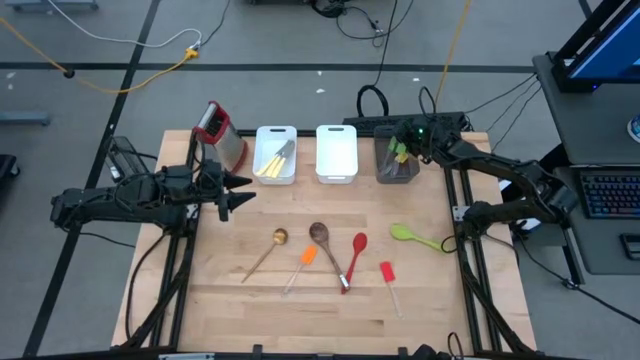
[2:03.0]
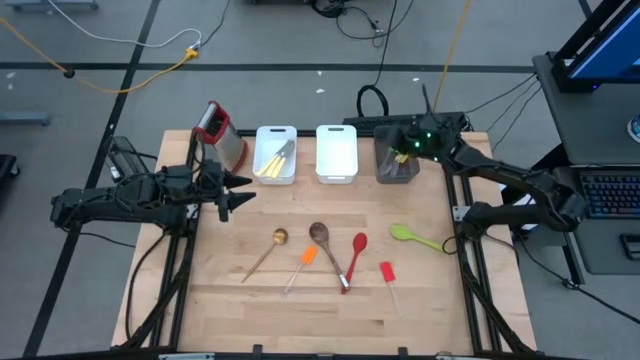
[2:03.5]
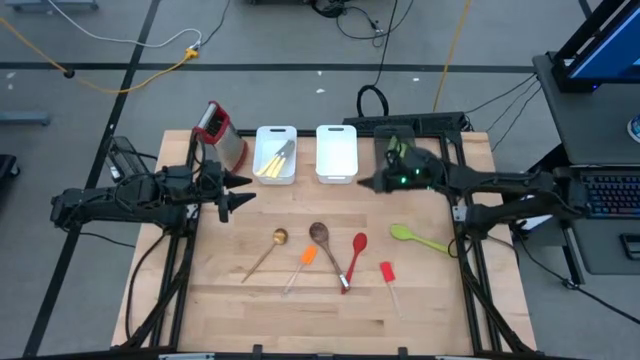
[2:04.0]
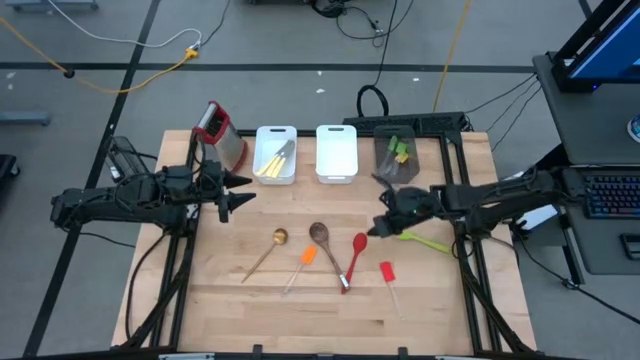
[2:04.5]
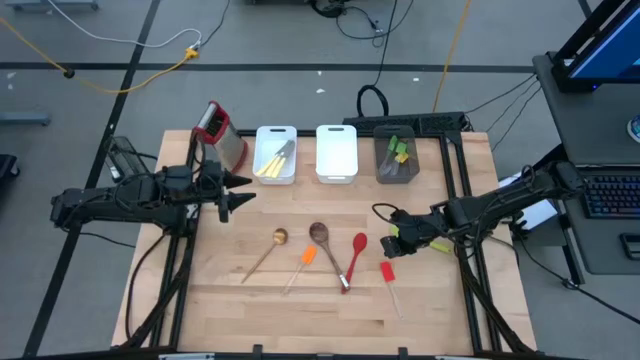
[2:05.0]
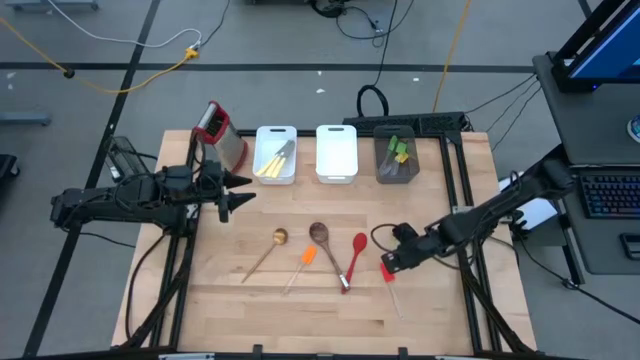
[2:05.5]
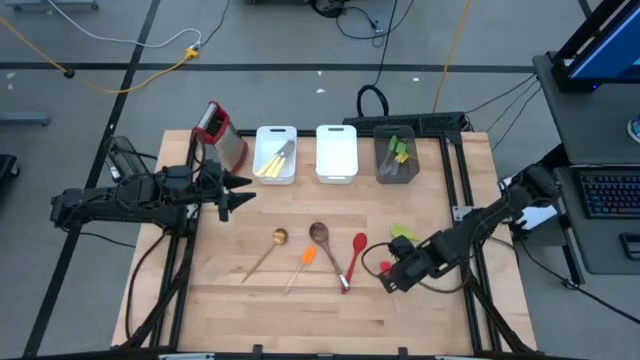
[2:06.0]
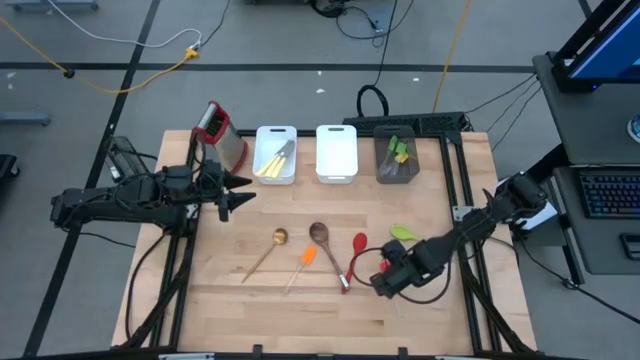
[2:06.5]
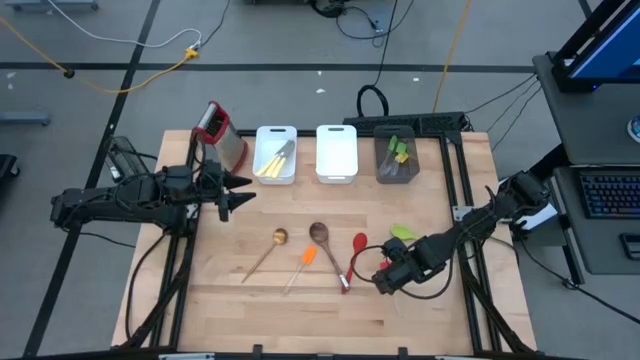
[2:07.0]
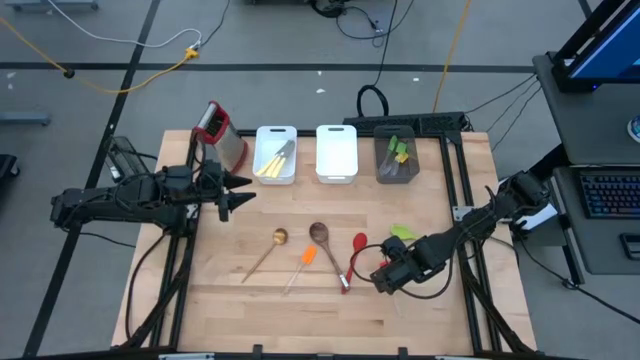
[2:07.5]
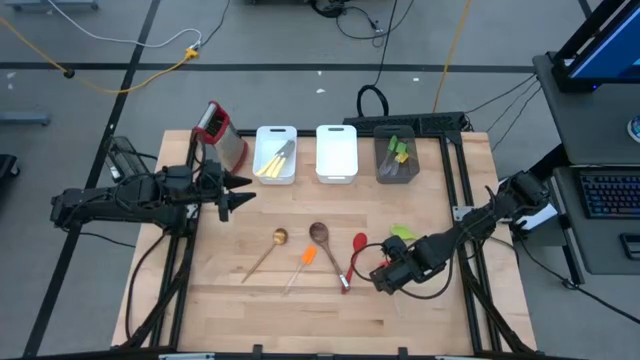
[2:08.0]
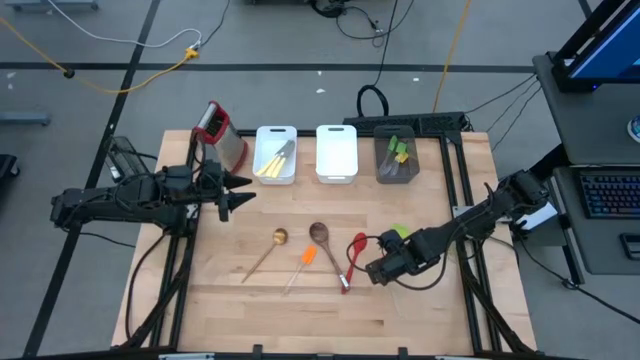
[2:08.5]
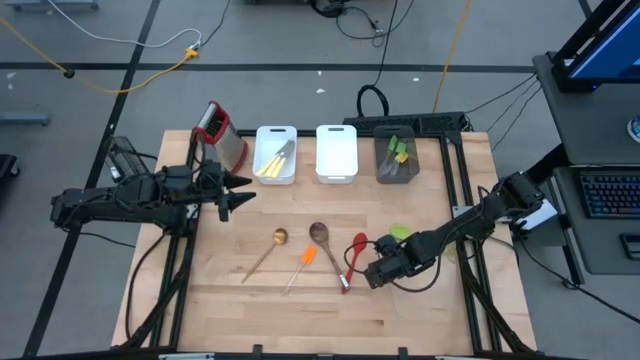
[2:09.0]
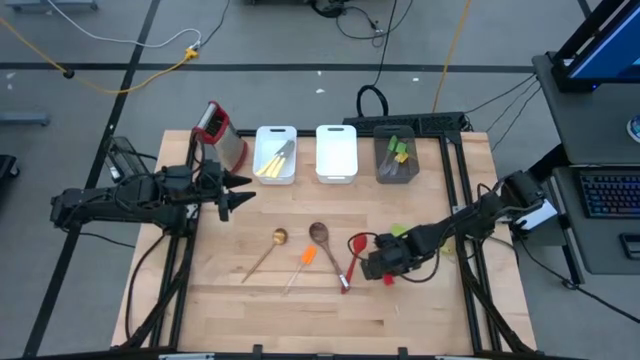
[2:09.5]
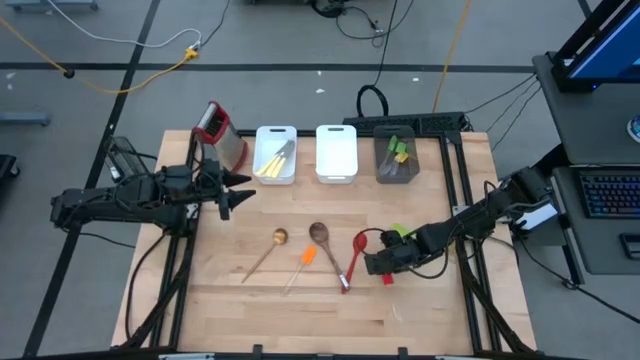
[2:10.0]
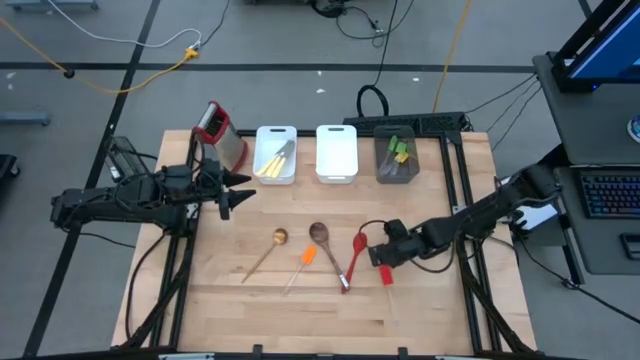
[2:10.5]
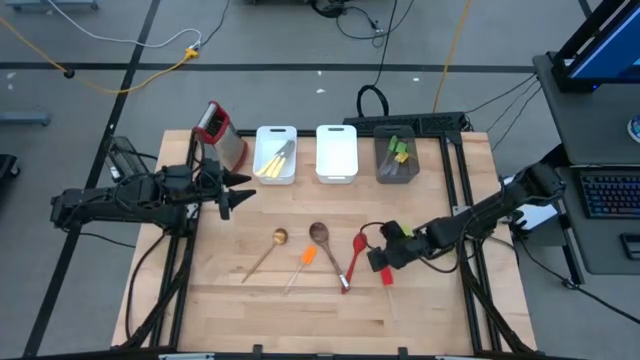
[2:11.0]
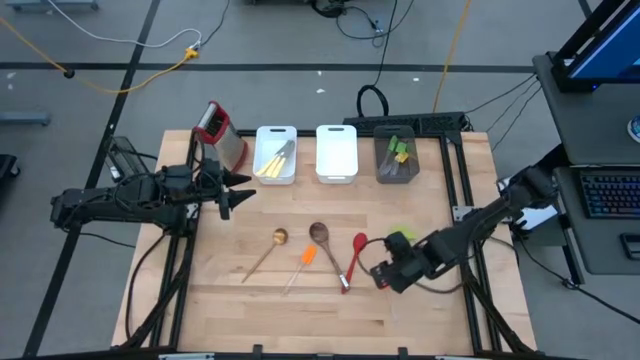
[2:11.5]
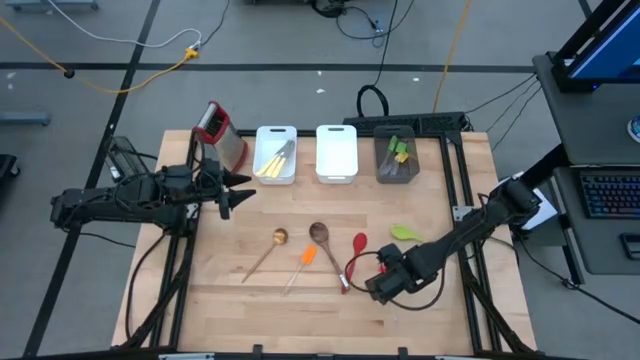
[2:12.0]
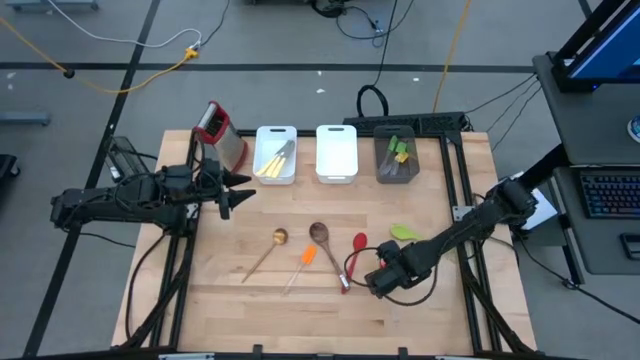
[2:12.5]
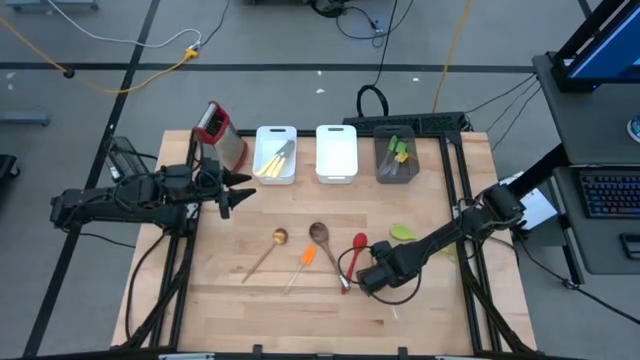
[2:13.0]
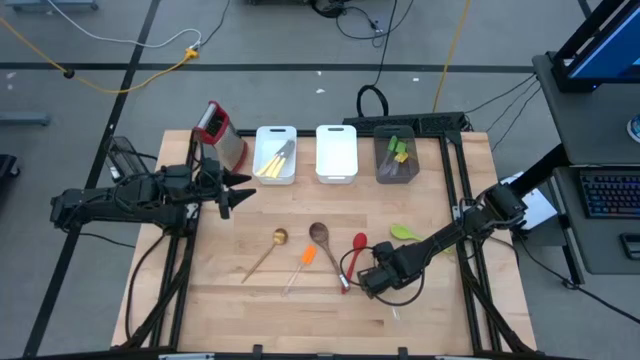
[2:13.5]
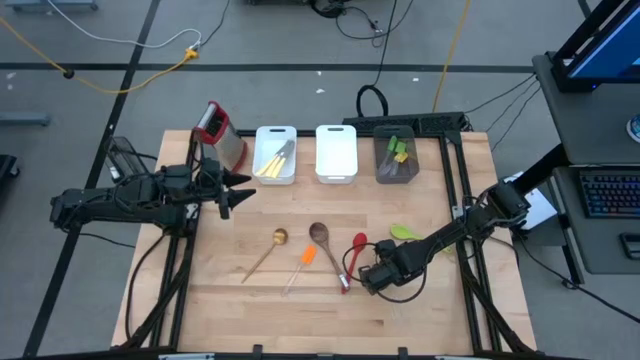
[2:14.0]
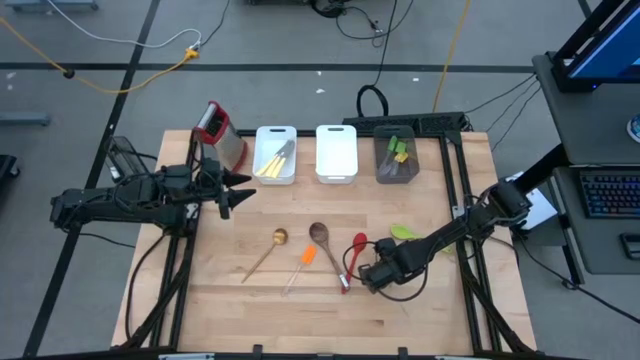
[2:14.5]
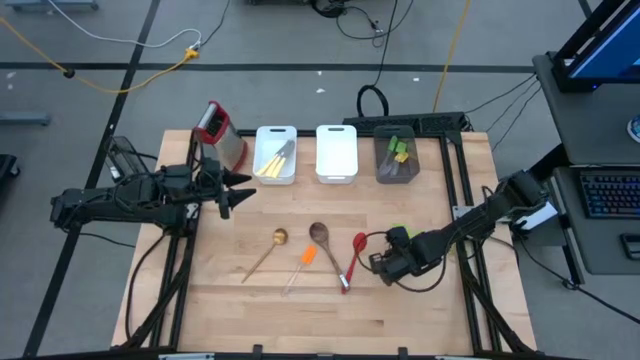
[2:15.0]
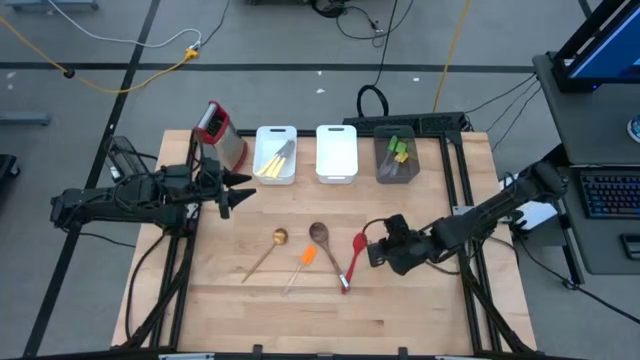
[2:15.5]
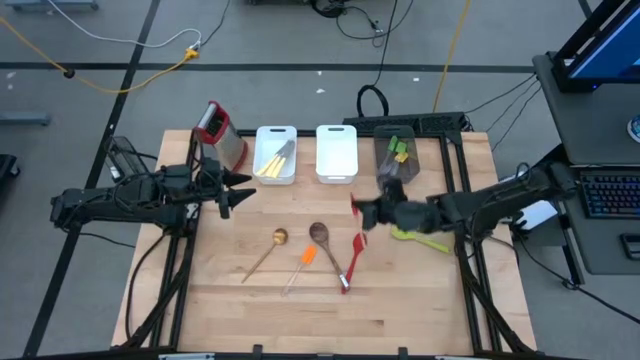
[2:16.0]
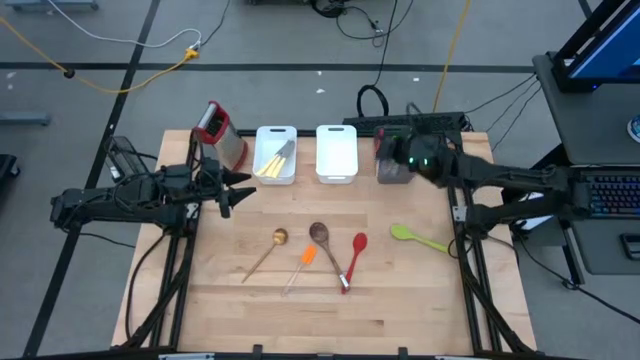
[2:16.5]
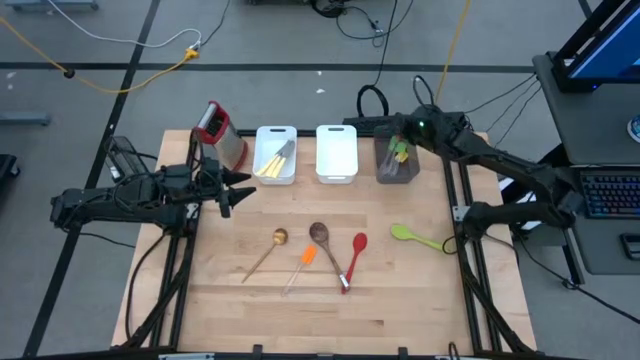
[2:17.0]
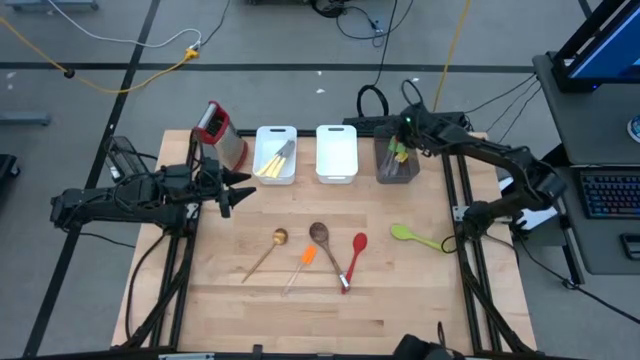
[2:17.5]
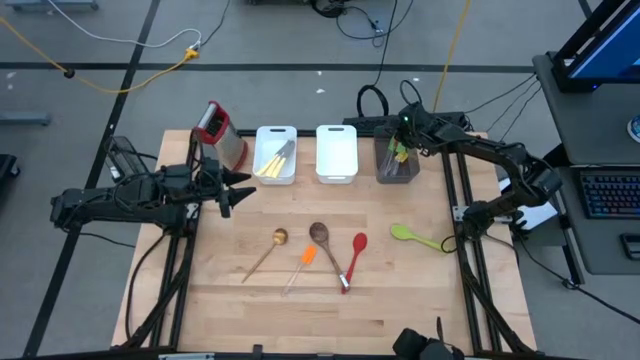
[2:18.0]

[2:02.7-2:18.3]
Task: Pick & Place Kitchen Items
Put the red spatula into the black bin

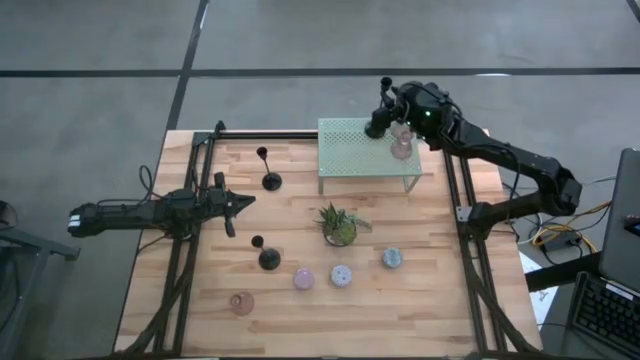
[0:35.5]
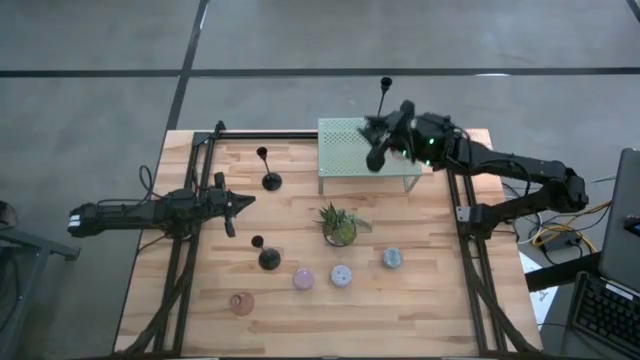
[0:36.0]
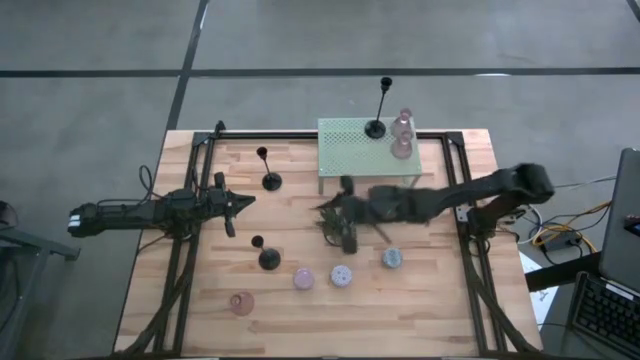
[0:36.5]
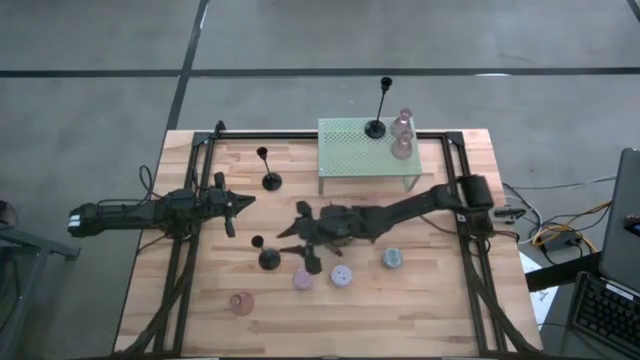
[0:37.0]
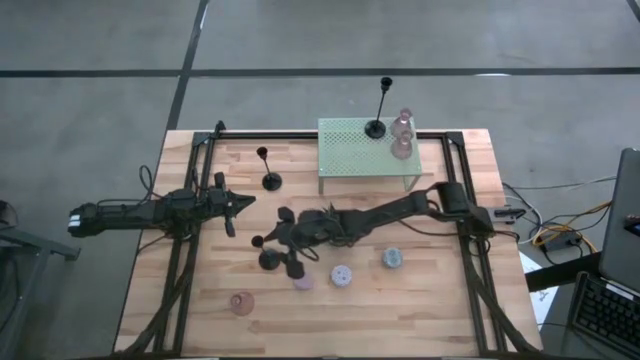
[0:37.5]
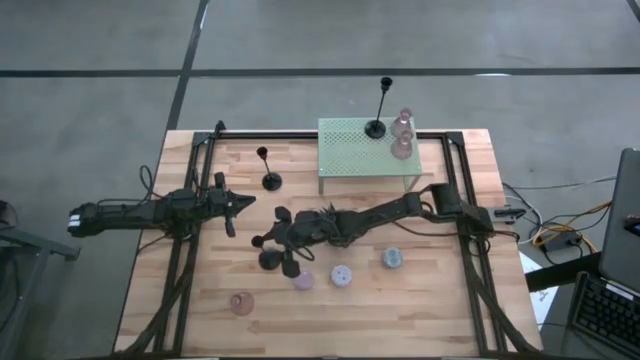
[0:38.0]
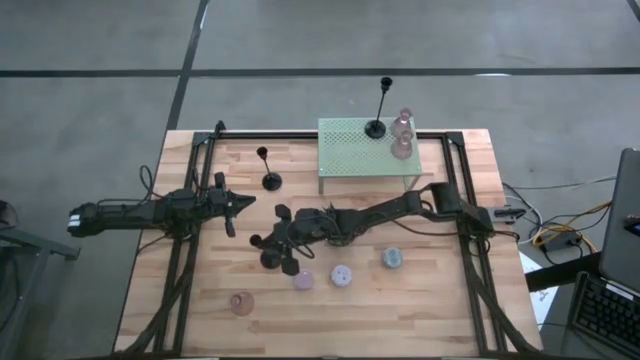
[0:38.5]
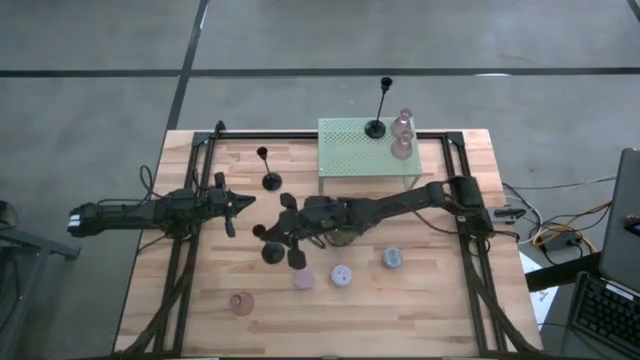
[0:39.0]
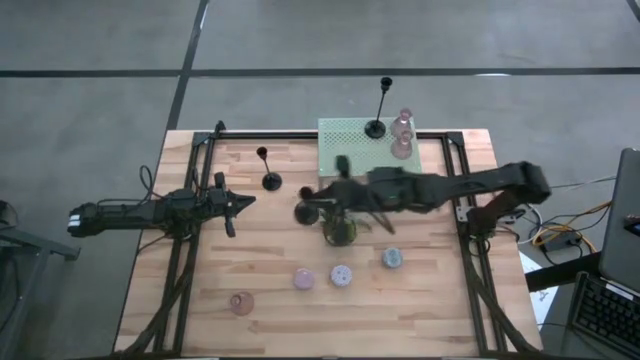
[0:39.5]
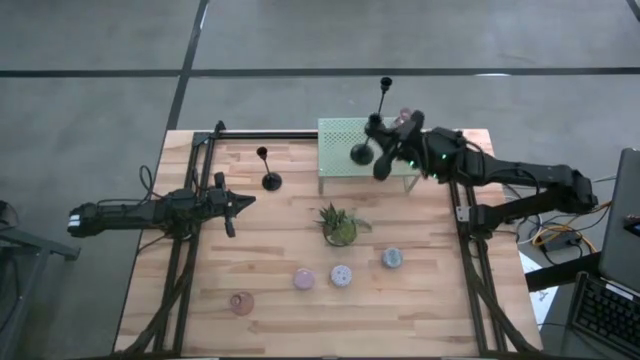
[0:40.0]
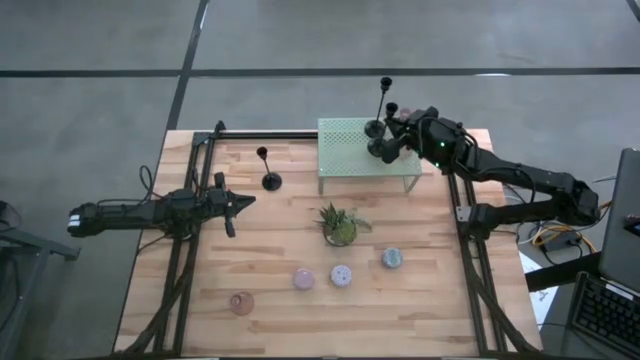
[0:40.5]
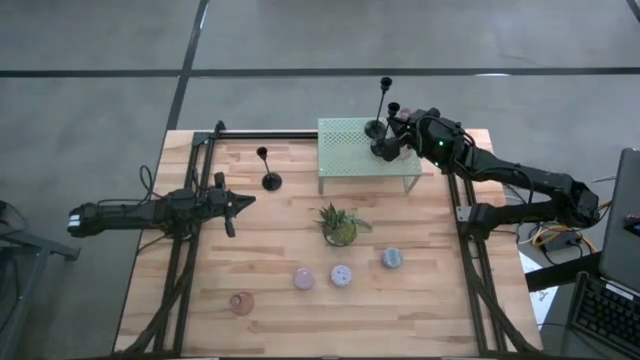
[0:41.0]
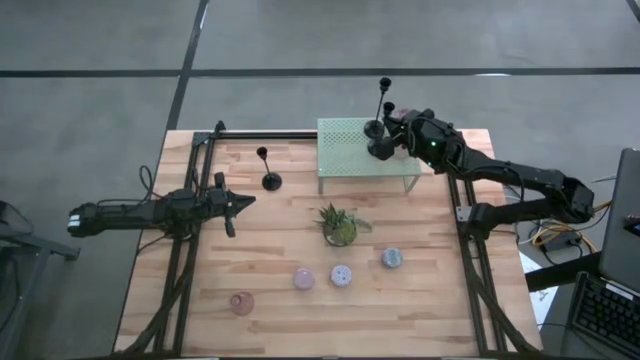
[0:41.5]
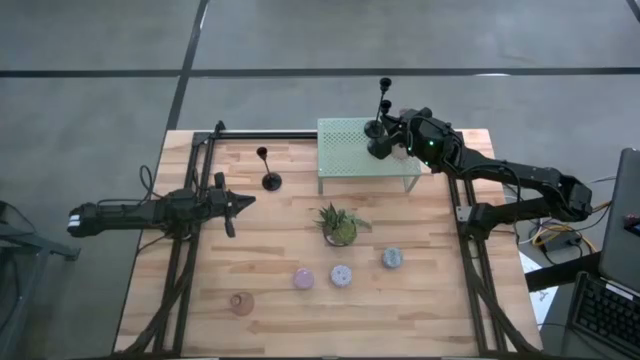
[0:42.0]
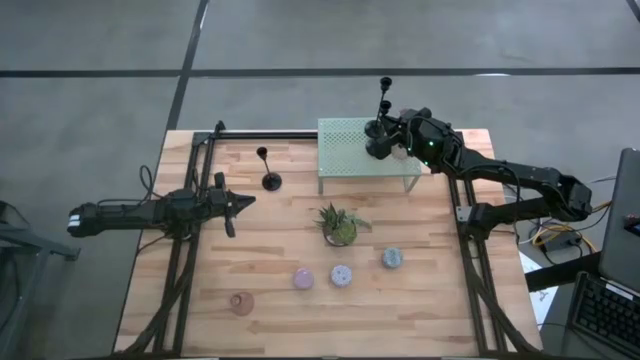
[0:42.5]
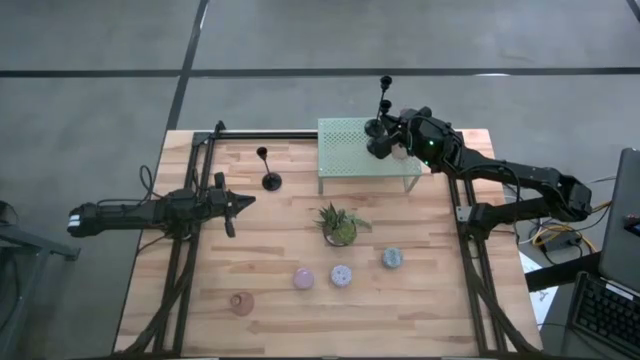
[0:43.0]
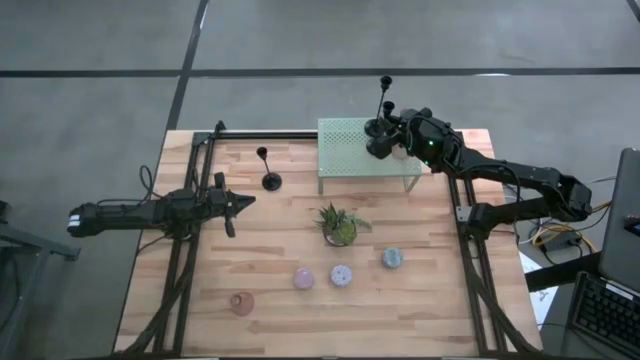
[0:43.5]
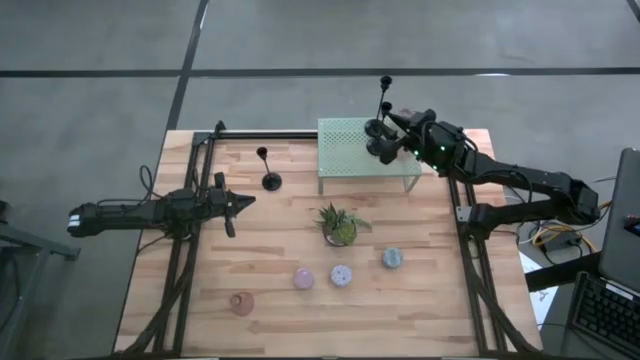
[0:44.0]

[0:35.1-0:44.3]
Task: Pick & Place candle stick holders
Put the bottom black candle holder on the shelf
